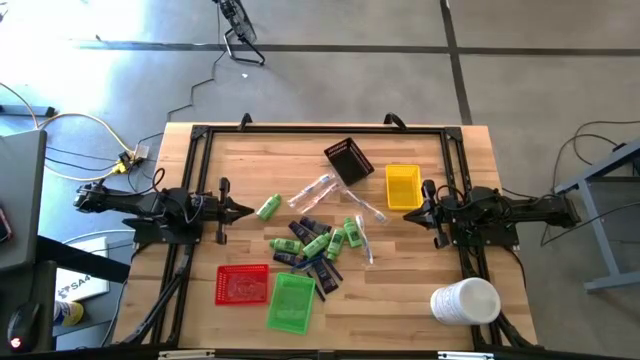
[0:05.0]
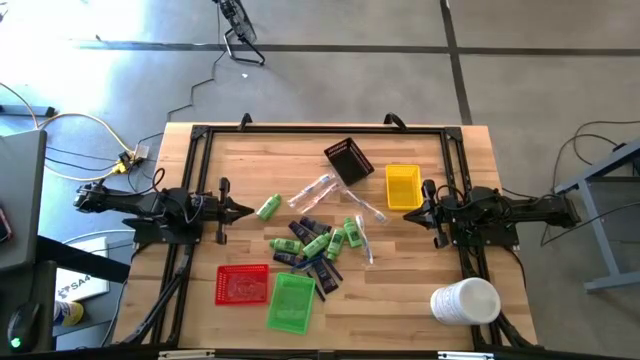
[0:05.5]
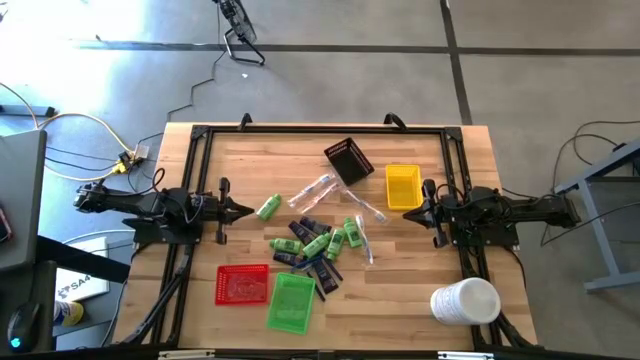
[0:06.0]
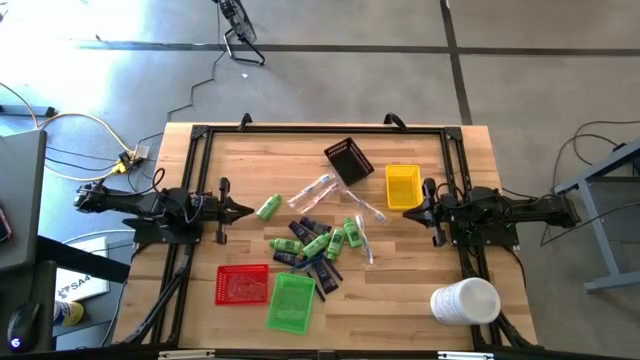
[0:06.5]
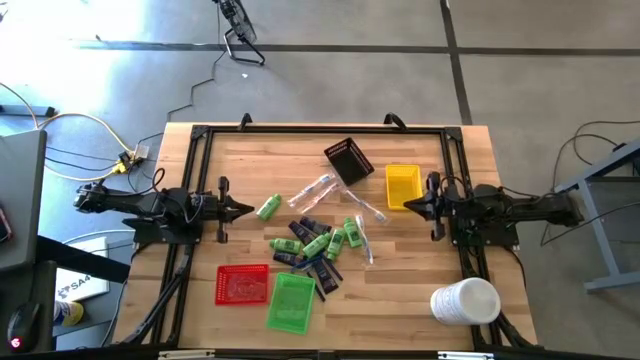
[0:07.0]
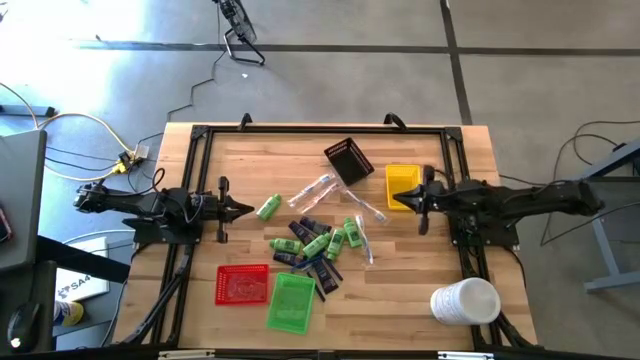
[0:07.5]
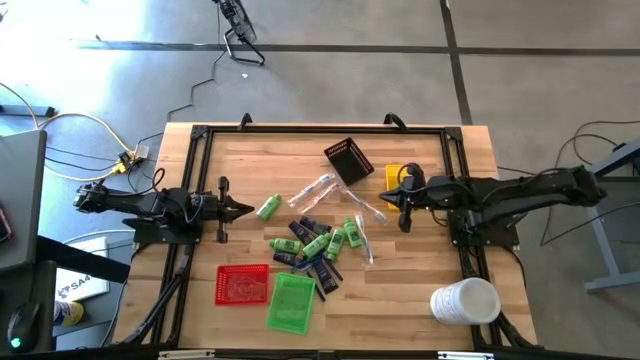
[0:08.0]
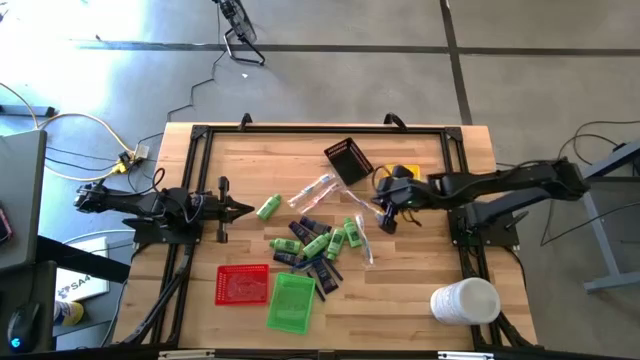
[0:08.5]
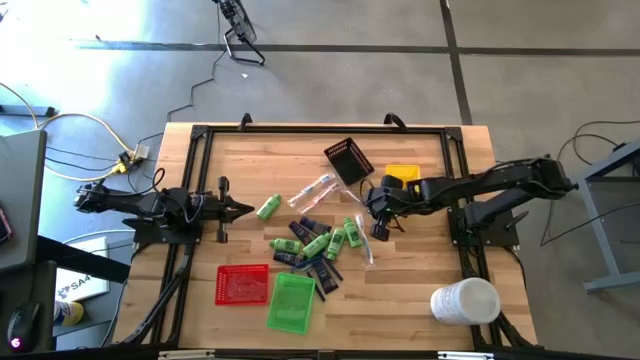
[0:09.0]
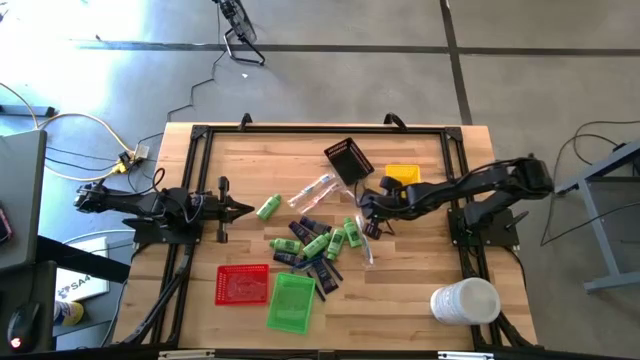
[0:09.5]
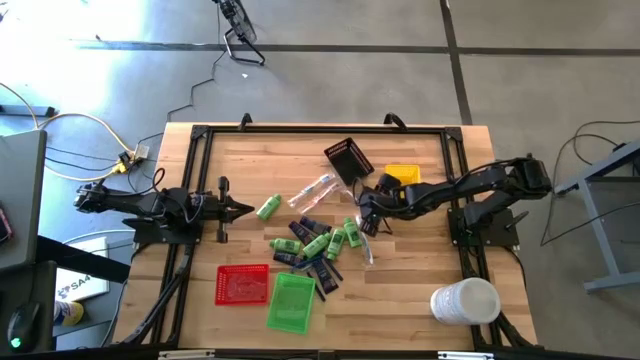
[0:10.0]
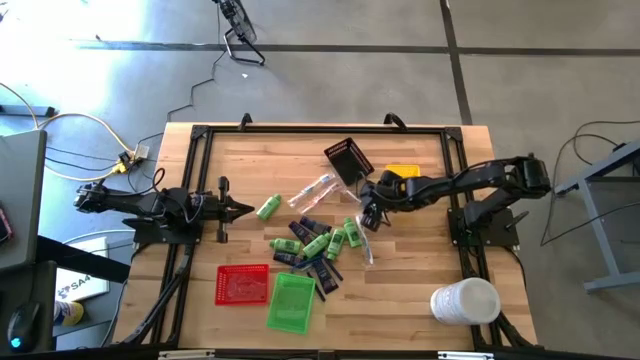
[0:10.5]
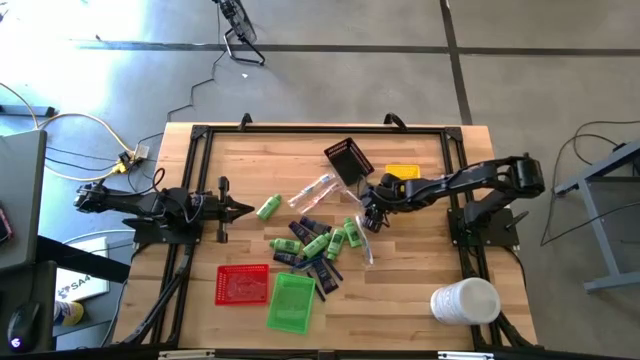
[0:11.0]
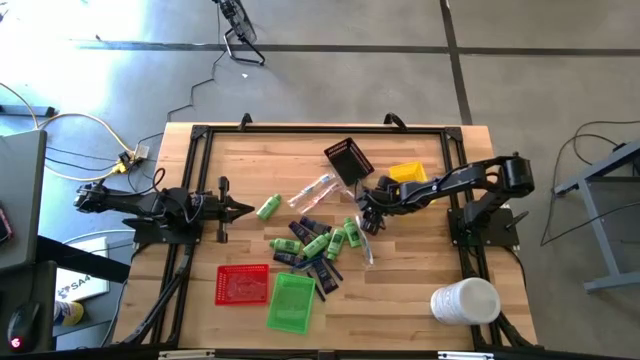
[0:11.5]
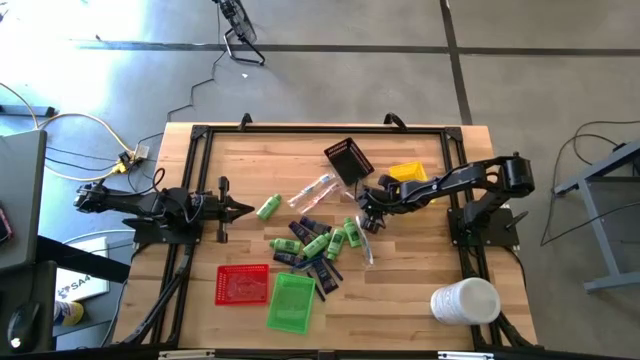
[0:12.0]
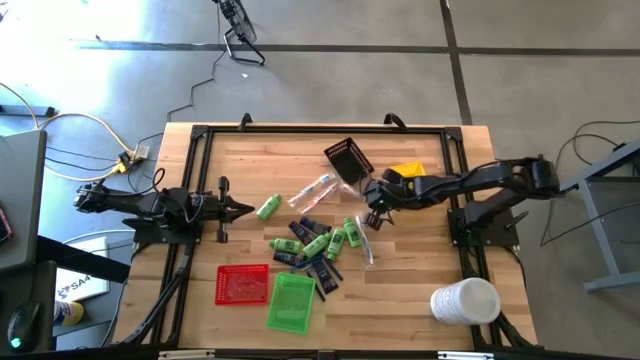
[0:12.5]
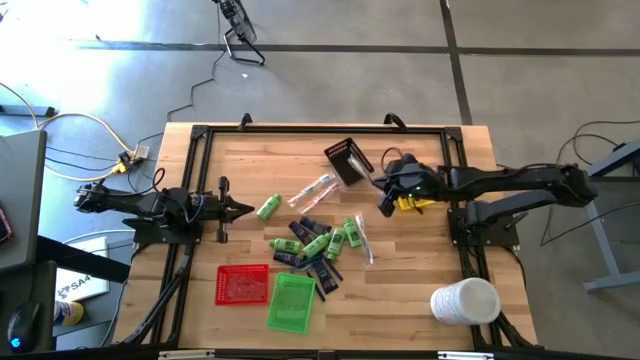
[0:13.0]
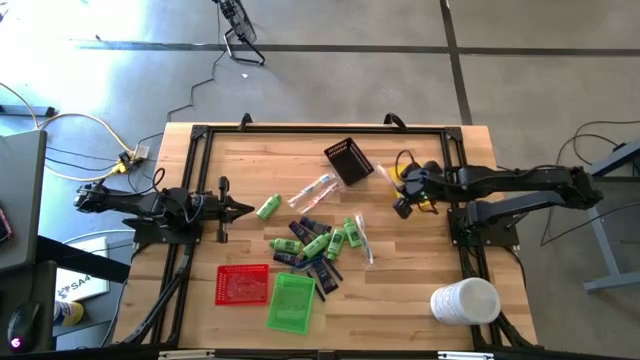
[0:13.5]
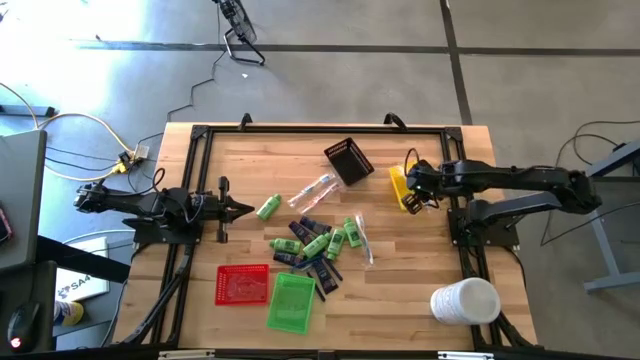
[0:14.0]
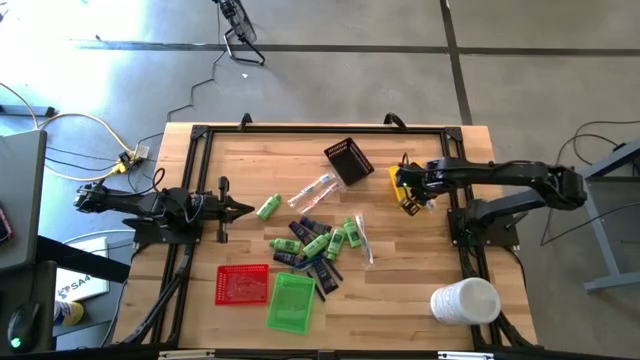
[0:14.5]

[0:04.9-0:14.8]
Task: Pick & Place Travel size toiletries
Put the top right blue toothbrush into the yellow bin

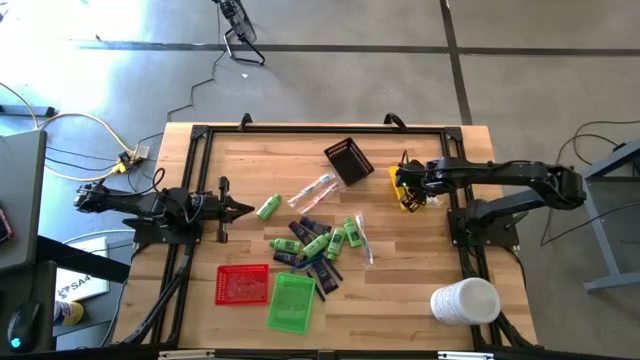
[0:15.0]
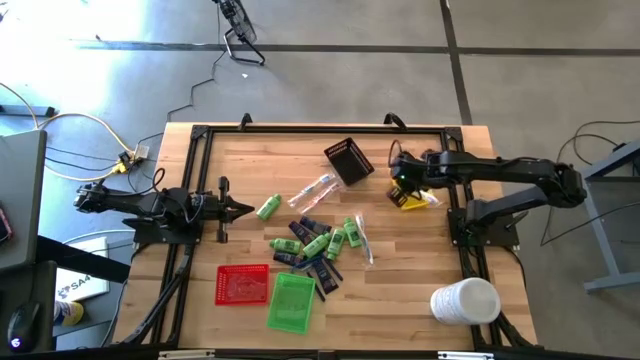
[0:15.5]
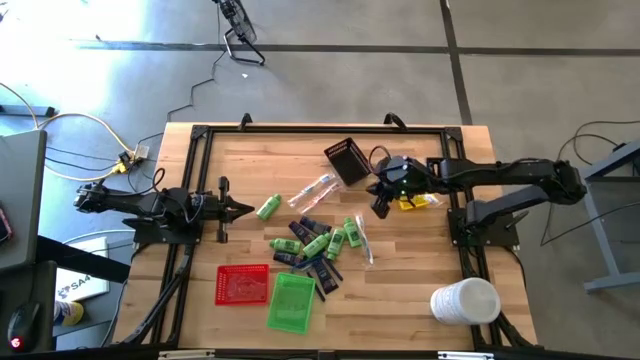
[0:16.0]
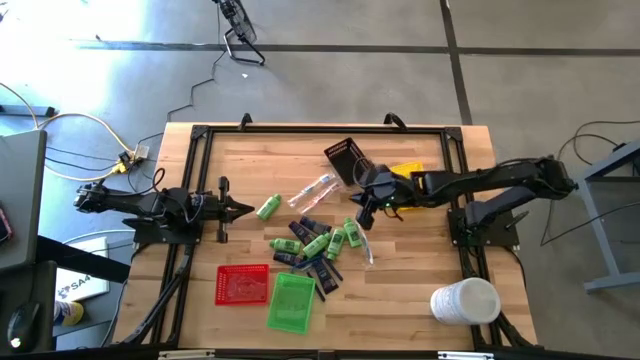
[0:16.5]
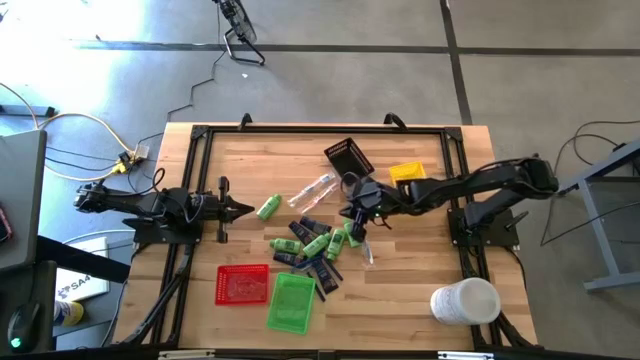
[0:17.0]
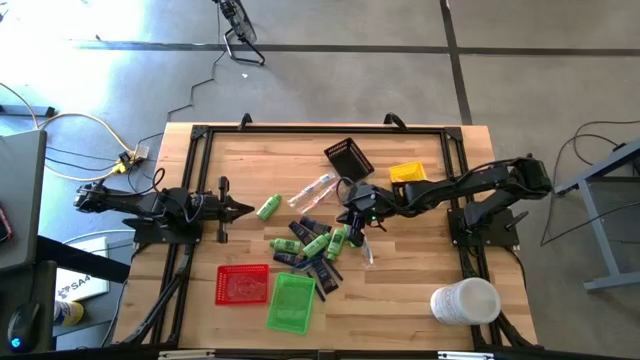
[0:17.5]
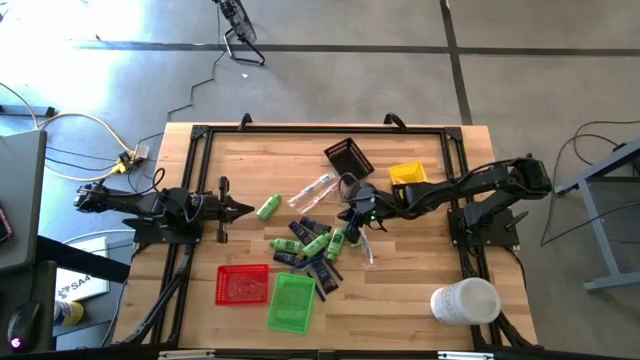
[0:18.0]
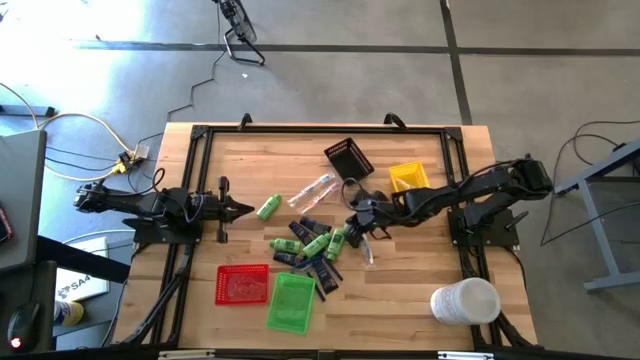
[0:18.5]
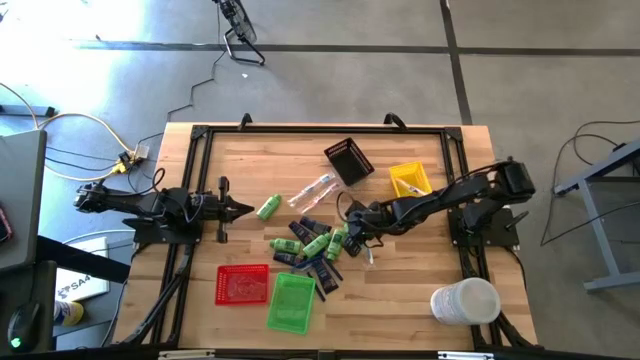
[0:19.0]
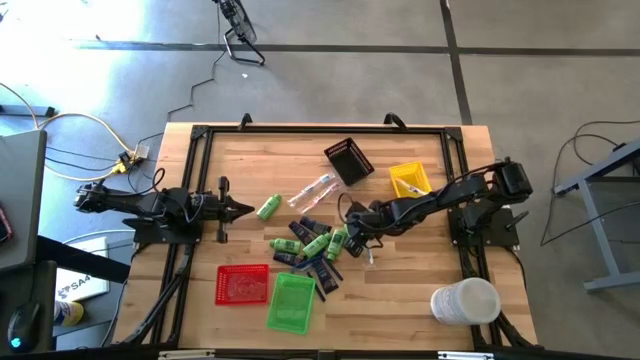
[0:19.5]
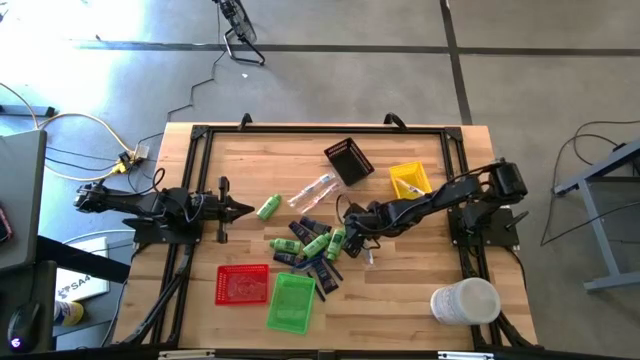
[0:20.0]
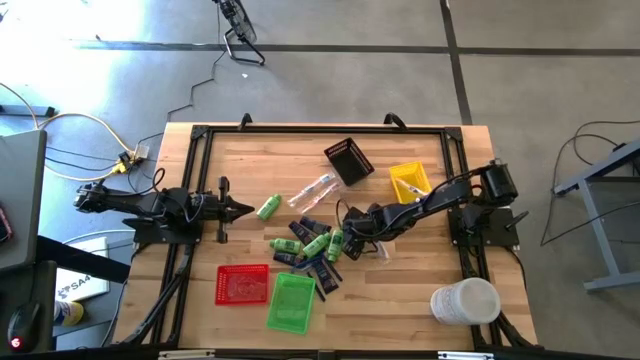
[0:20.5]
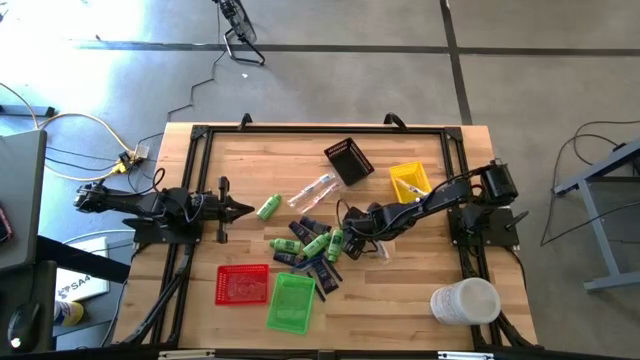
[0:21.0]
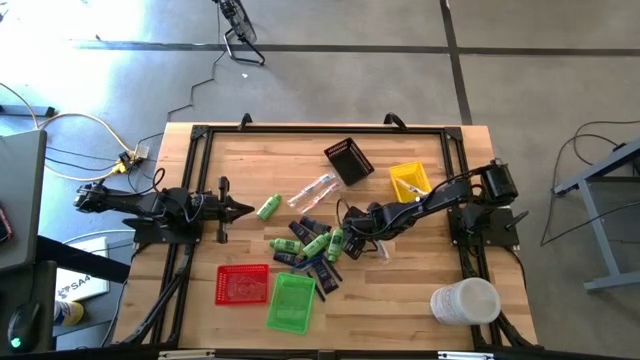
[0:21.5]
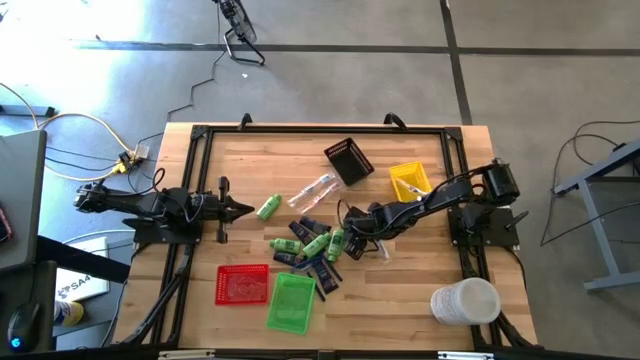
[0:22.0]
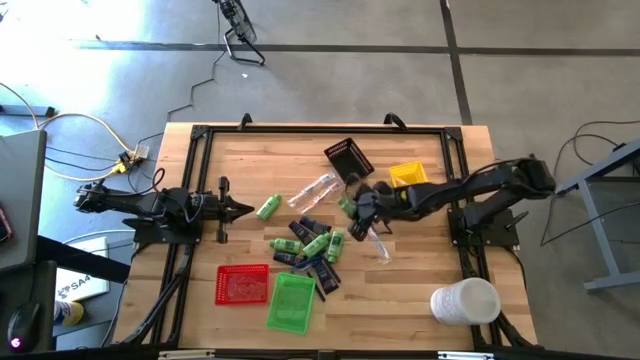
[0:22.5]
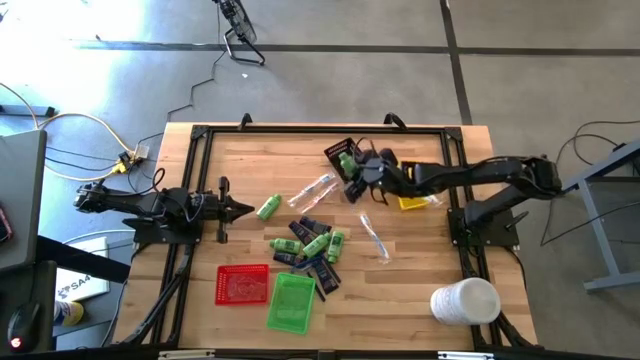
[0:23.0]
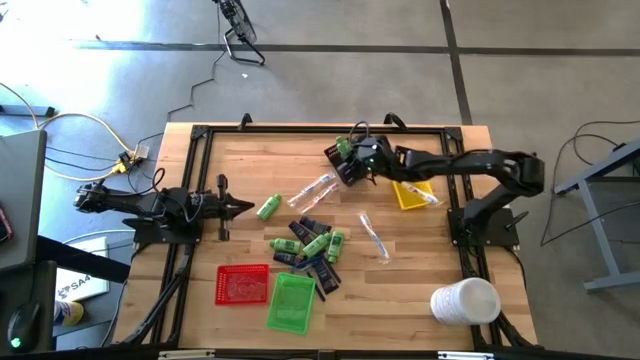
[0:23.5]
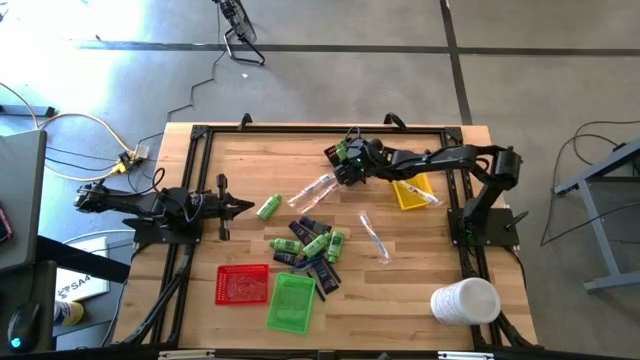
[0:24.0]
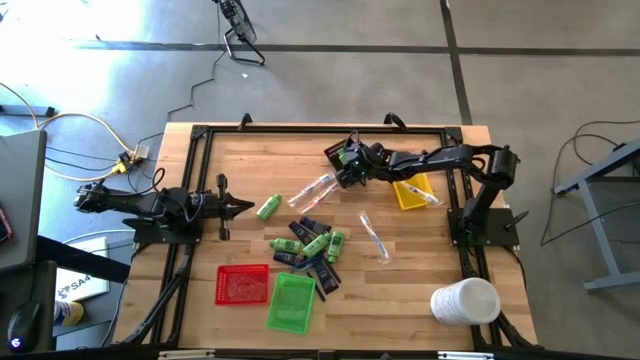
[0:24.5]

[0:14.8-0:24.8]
Put the shampoo into the black bin

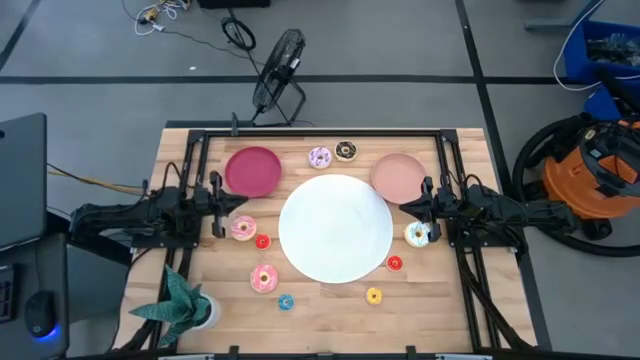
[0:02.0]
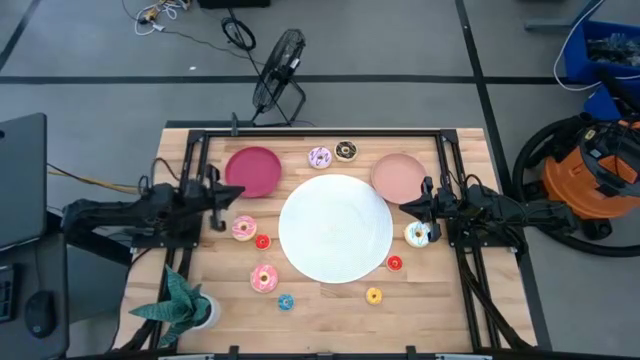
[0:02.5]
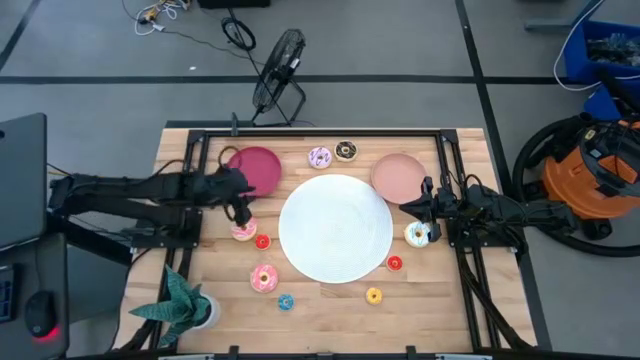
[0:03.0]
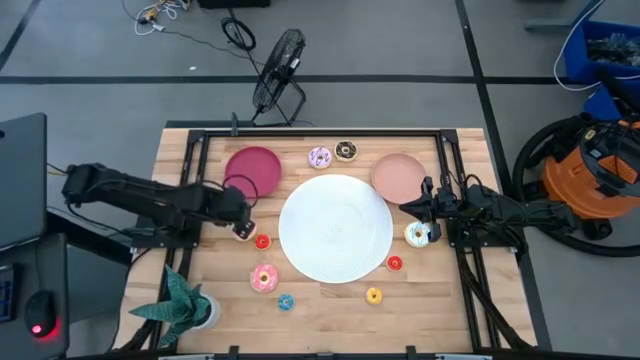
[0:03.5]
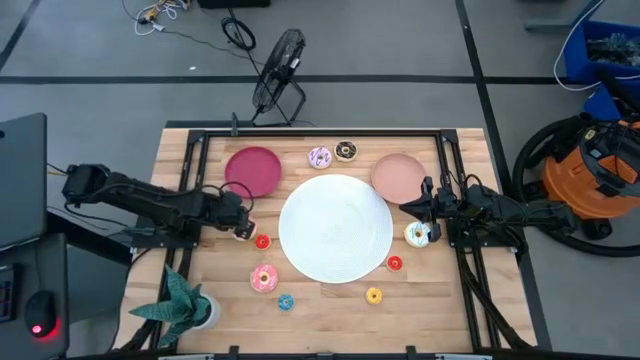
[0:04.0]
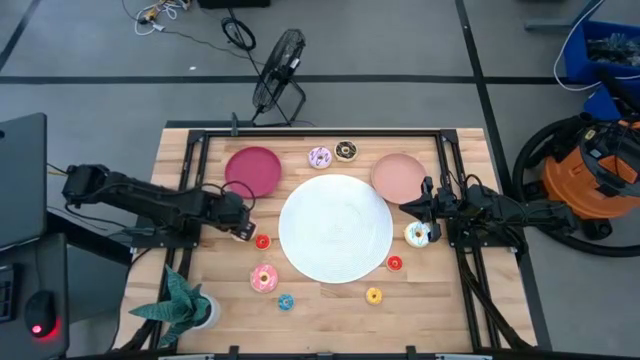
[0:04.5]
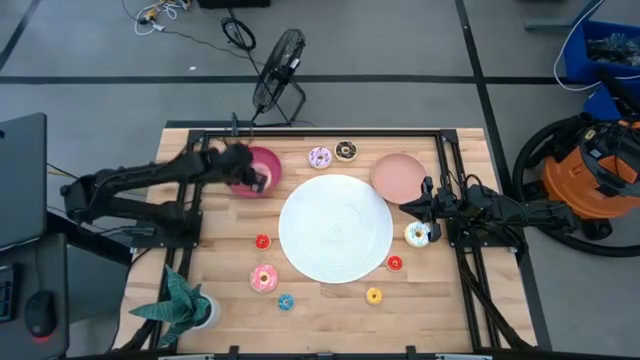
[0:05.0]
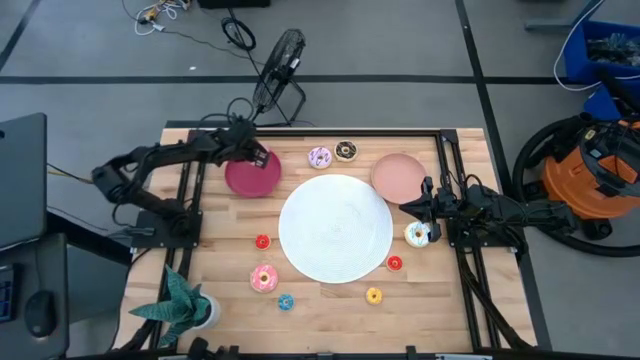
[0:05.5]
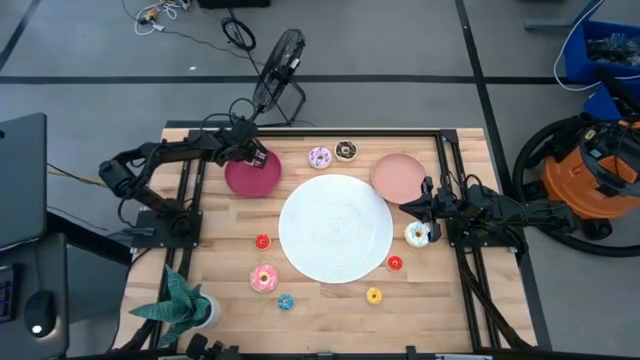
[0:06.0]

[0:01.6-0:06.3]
Task: Pick & Place donuts
Put the top big pink donut on the dark pink plate
